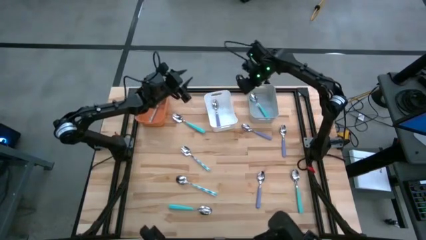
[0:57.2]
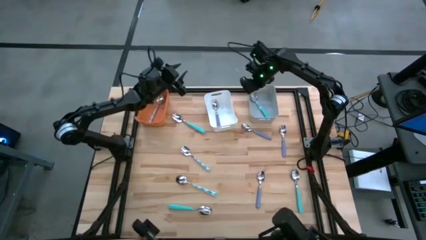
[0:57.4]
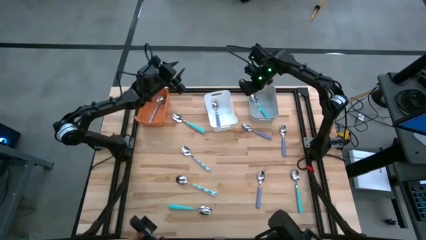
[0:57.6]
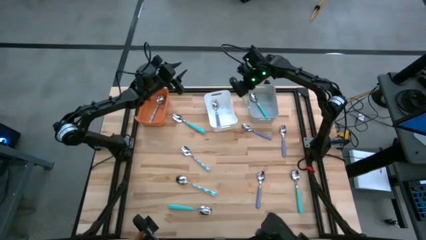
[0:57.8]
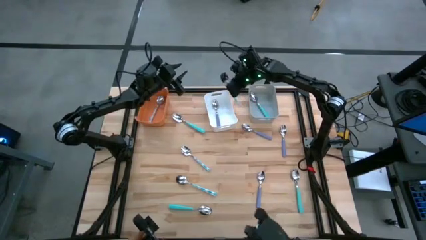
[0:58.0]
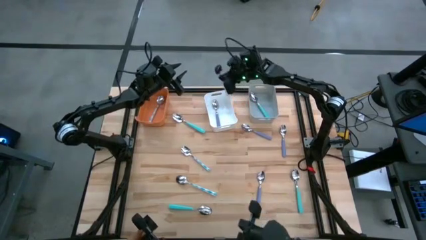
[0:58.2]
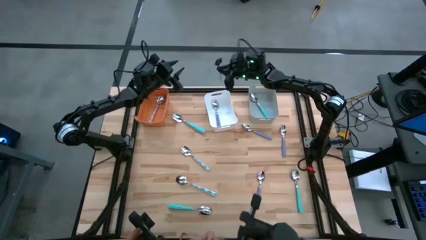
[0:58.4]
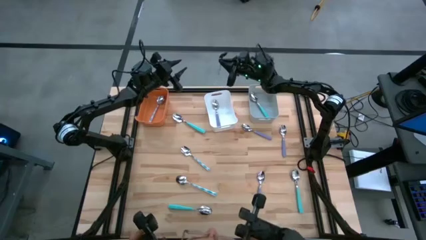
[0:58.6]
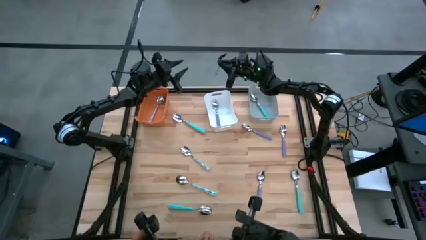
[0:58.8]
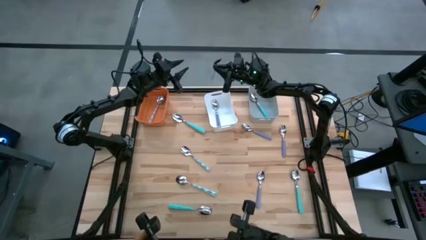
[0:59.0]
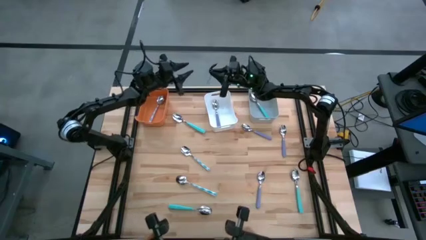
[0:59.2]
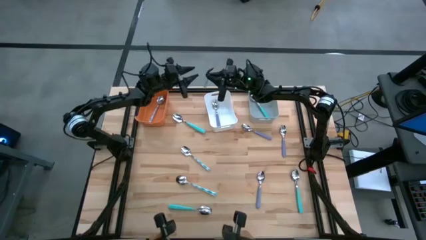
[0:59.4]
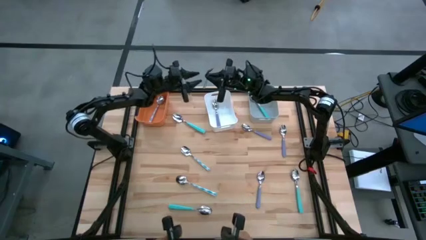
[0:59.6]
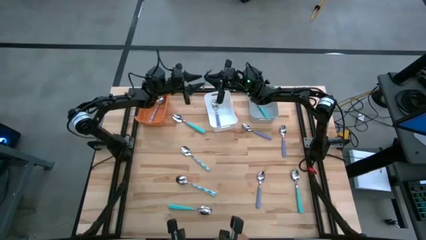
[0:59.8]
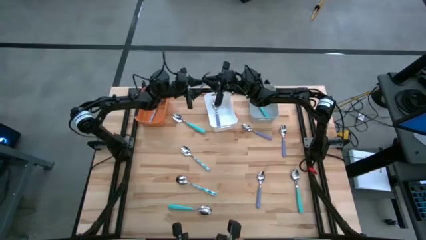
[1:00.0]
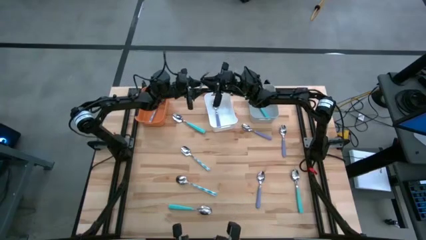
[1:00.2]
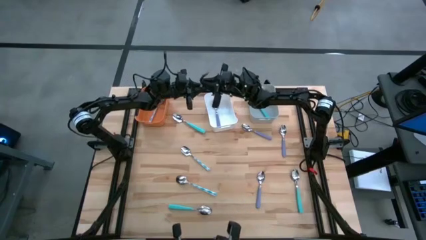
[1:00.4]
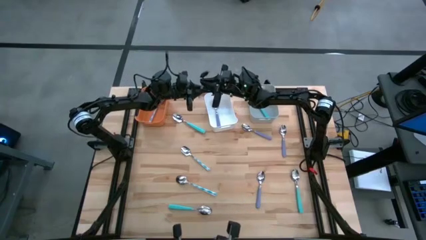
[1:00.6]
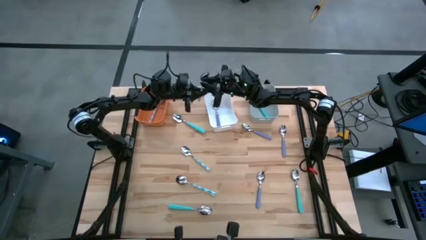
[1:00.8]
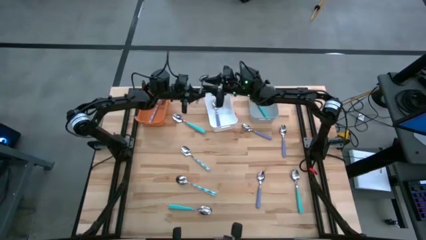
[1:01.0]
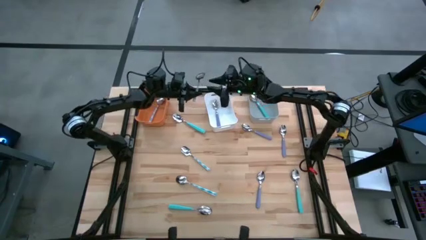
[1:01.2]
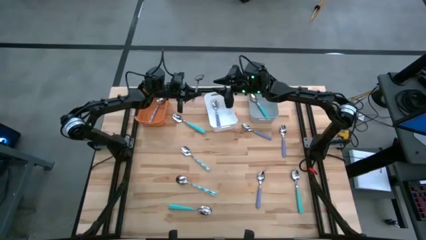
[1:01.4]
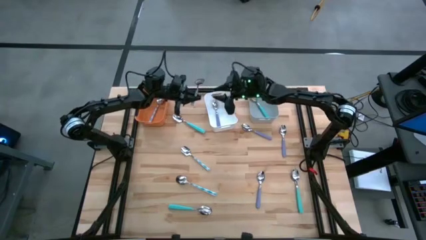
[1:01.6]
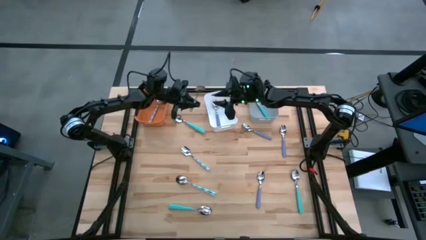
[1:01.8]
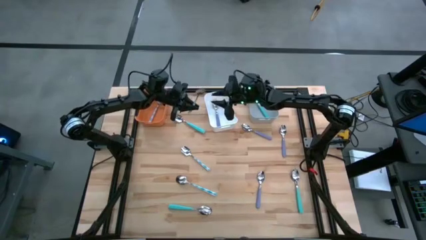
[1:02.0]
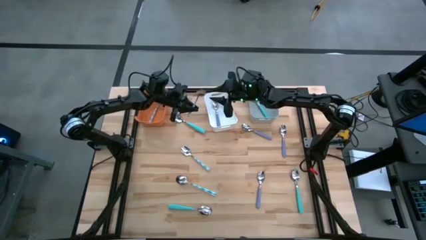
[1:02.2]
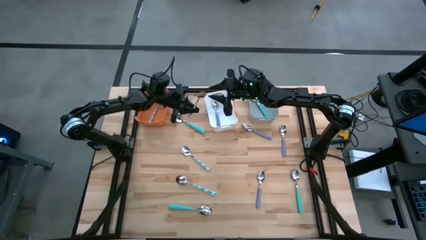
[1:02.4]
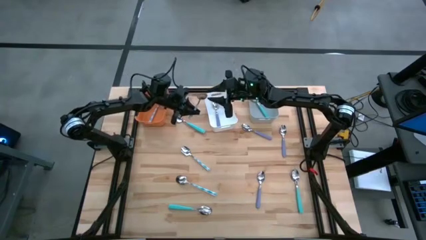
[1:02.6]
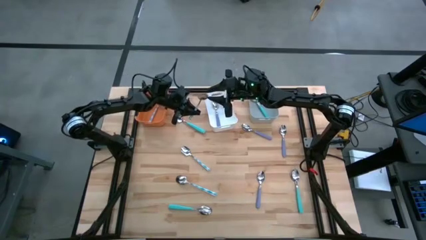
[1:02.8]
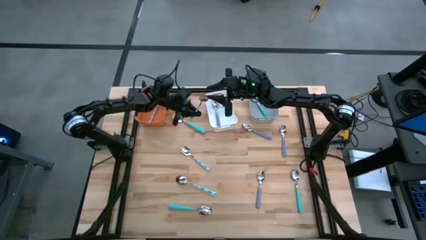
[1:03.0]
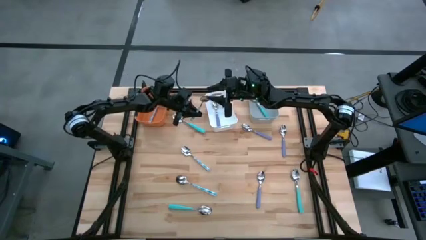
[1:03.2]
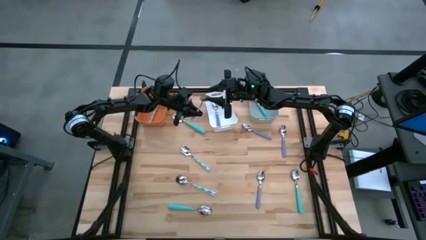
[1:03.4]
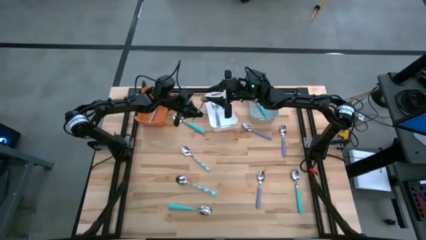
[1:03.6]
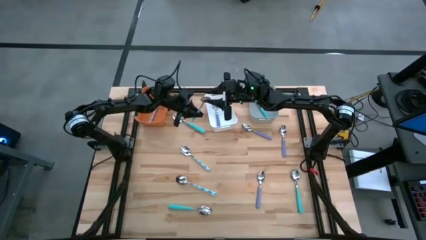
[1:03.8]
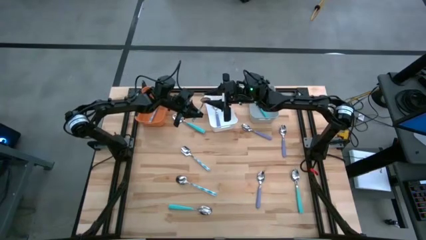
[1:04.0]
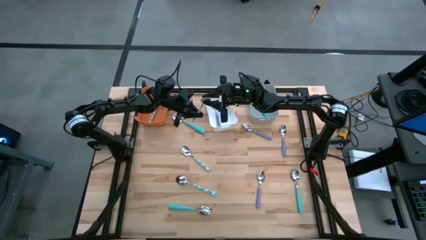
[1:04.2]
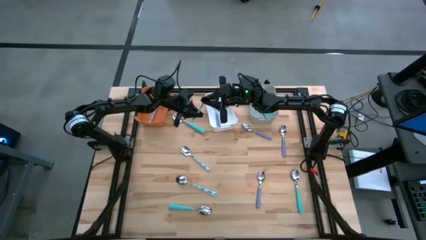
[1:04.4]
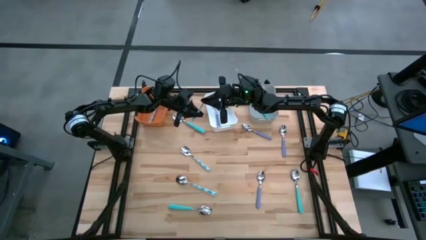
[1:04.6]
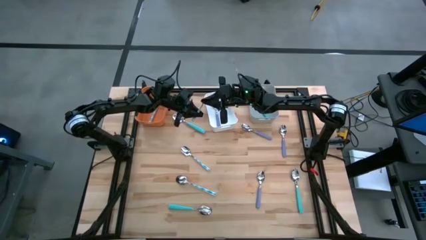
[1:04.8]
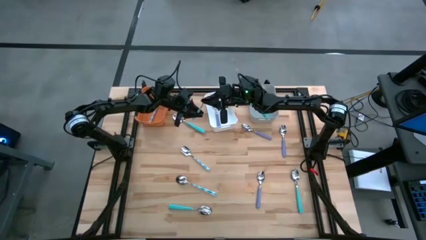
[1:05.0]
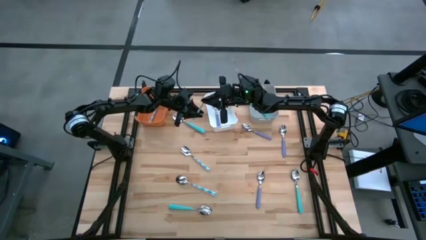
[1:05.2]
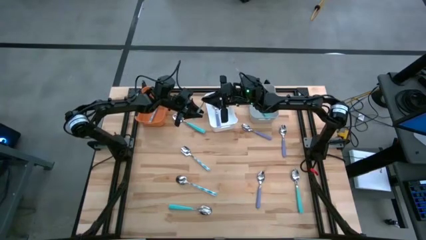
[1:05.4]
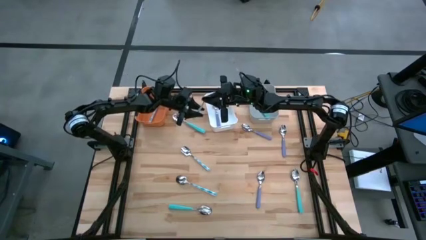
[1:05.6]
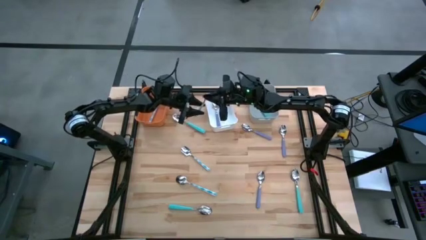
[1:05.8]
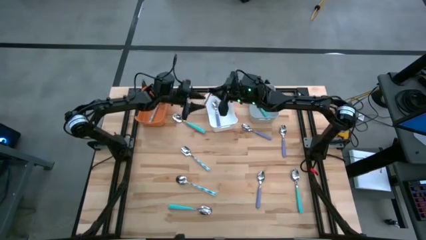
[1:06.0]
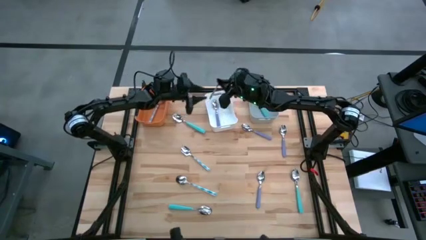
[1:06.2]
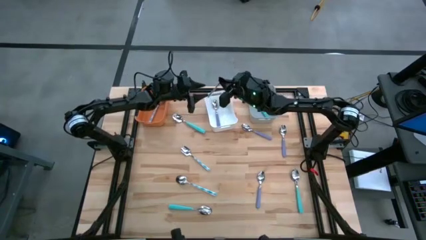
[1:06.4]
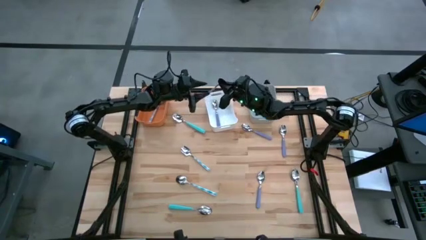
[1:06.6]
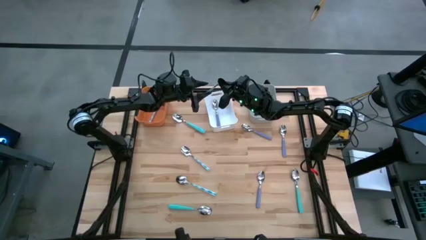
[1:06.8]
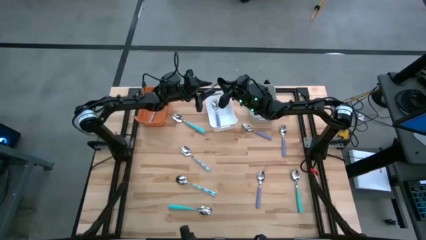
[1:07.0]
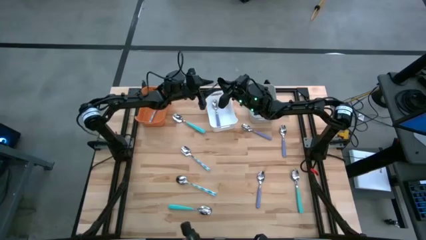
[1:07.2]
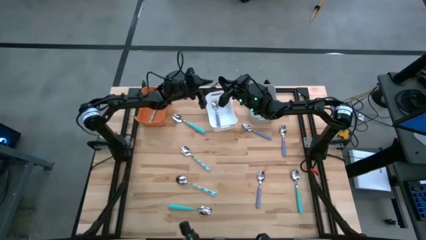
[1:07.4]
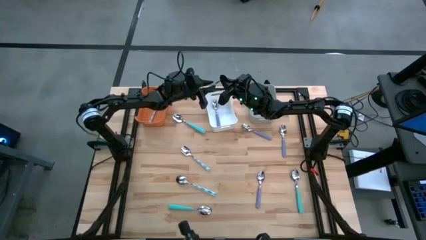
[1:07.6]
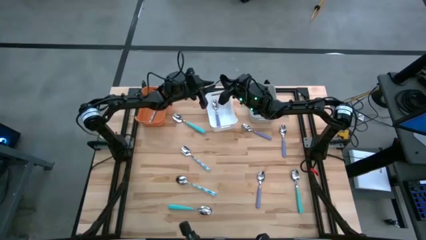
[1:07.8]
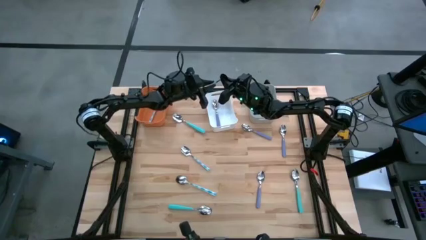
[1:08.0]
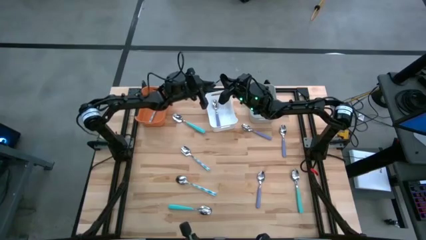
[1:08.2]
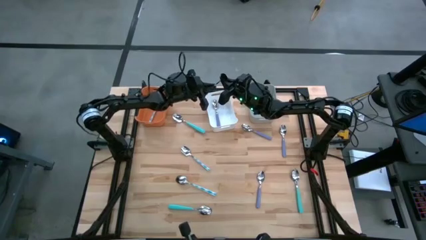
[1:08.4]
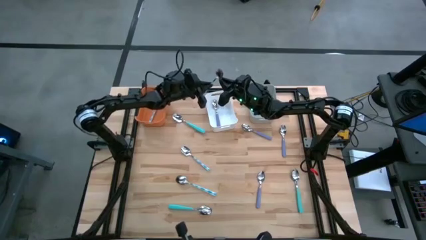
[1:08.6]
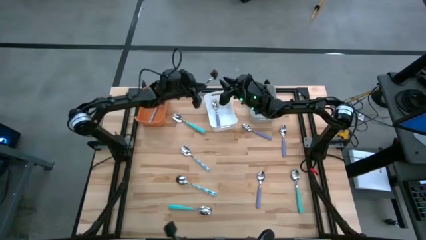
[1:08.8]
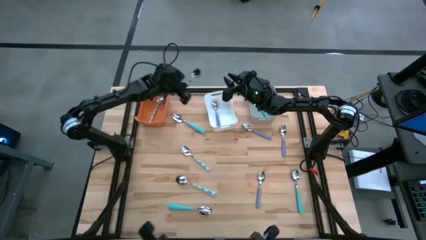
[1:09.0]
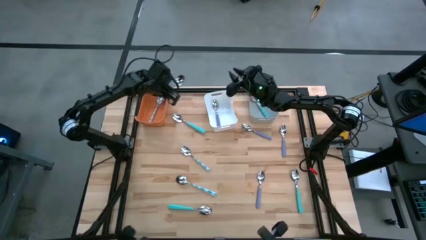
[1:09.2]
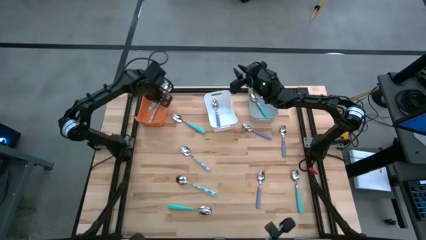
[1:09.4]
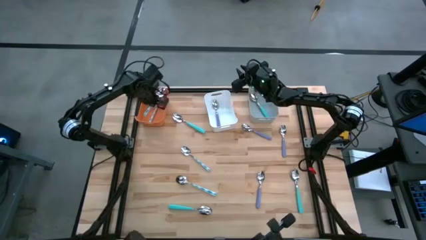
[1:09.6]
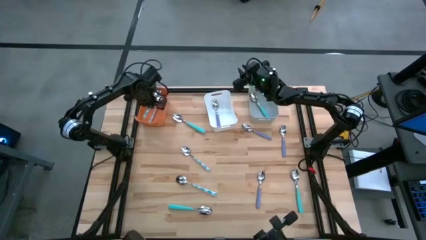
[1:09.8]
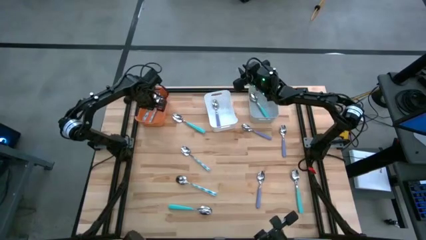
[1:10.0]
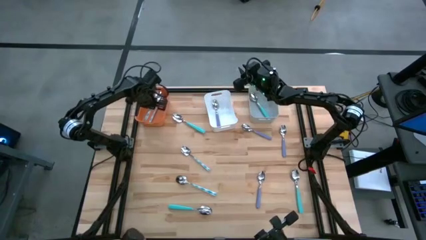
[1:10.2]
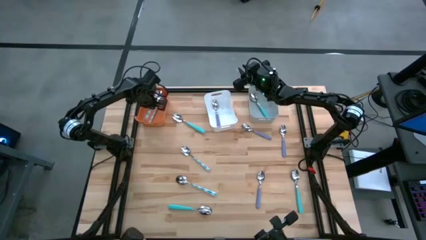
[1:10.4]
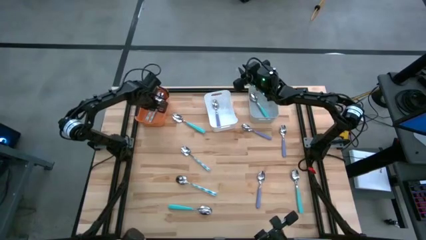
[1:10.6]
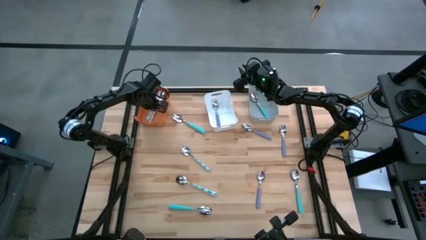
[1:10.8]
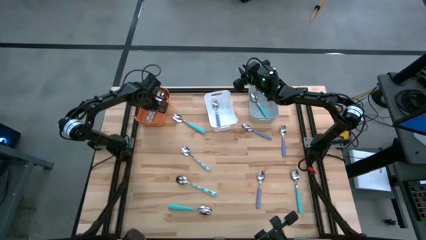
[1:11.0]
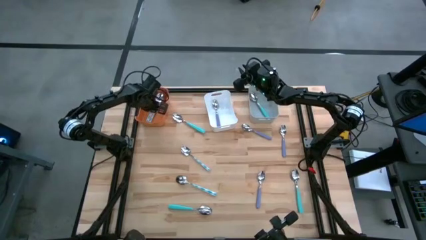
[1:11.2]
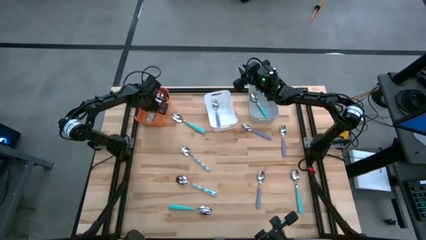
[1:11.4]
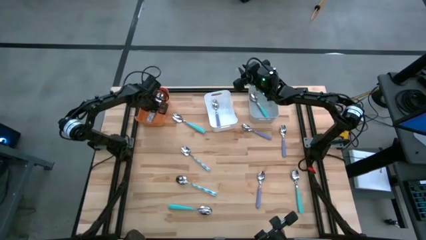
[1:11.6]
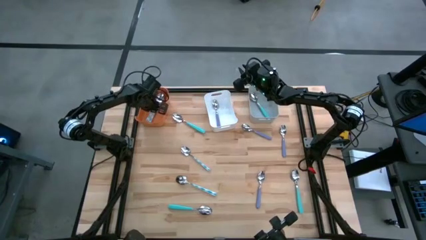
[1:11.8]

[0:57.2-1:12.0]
Task: Sort silverware by color (type)
Put the blue patterned spoon into the orange bin
